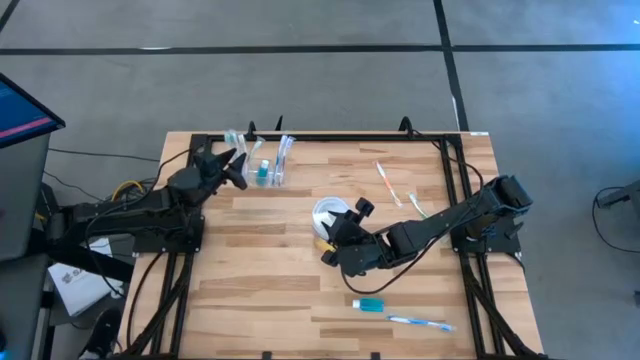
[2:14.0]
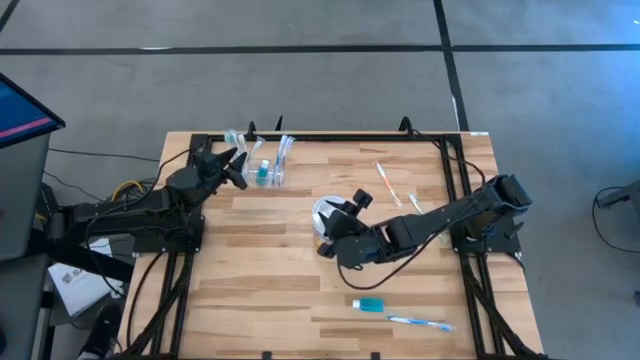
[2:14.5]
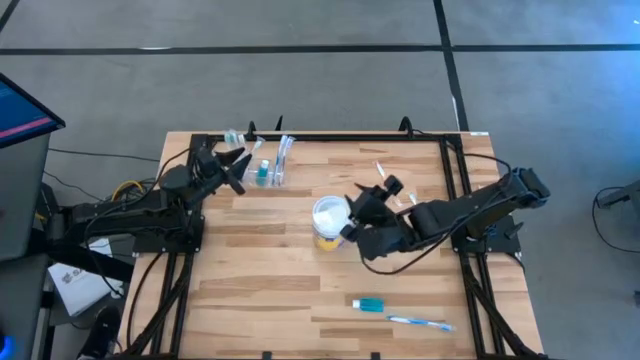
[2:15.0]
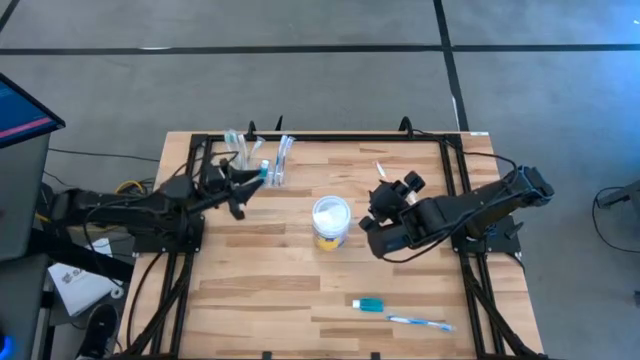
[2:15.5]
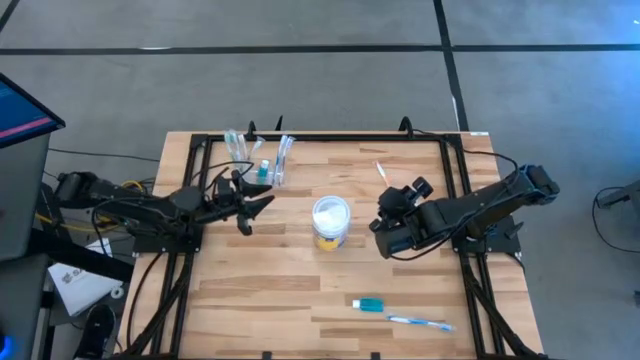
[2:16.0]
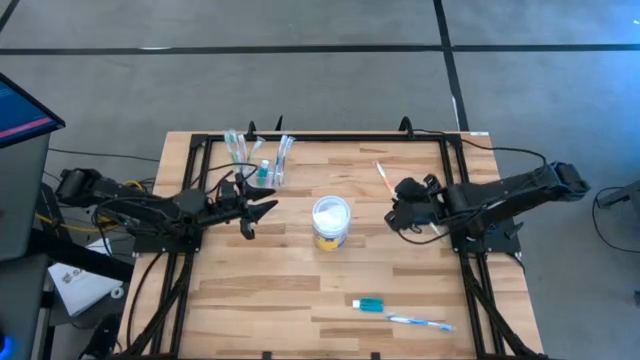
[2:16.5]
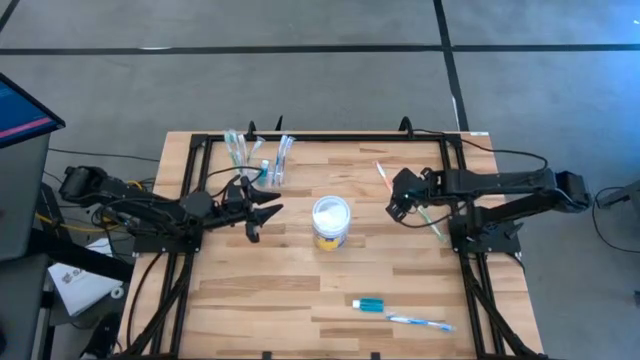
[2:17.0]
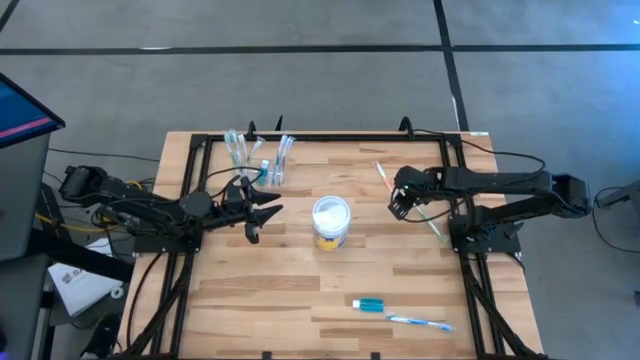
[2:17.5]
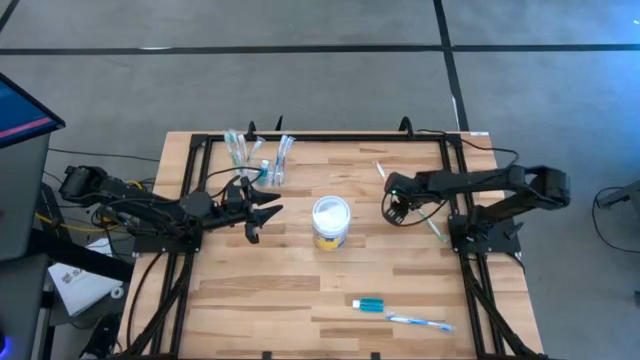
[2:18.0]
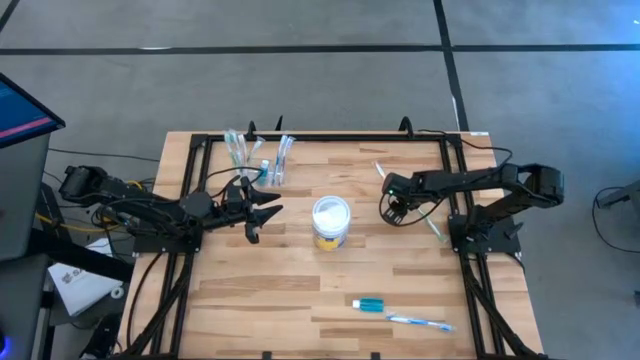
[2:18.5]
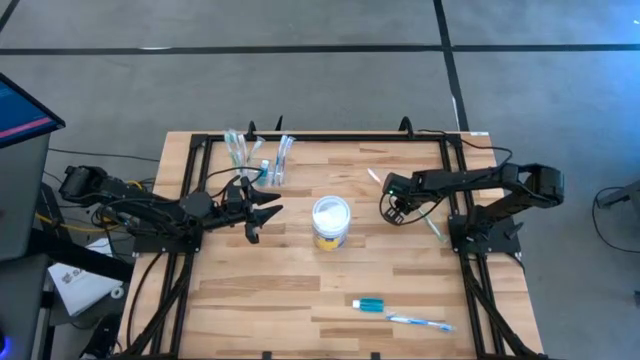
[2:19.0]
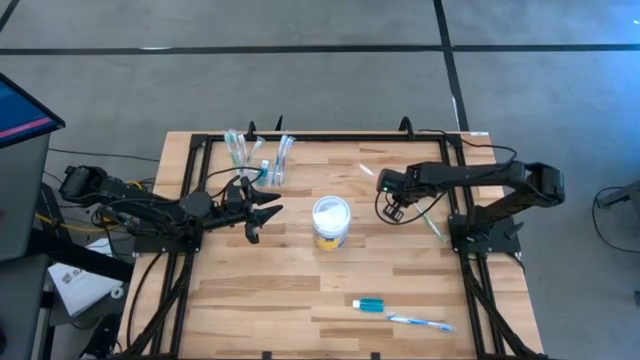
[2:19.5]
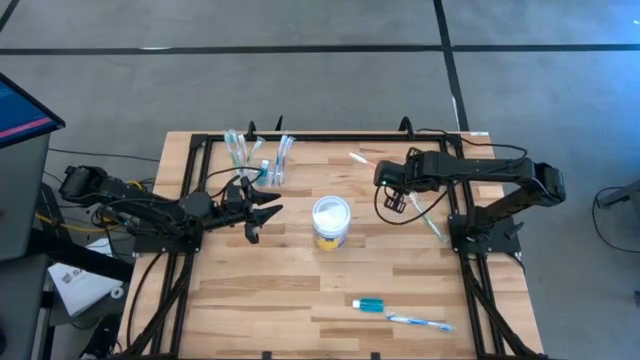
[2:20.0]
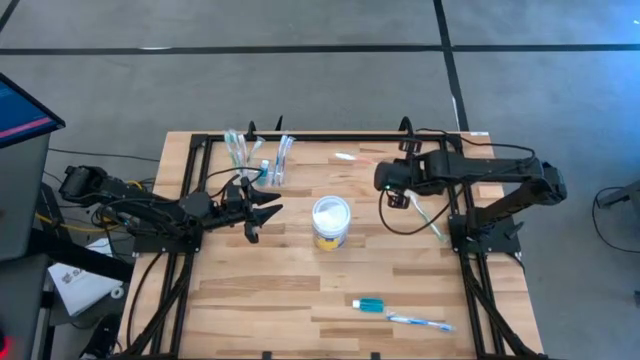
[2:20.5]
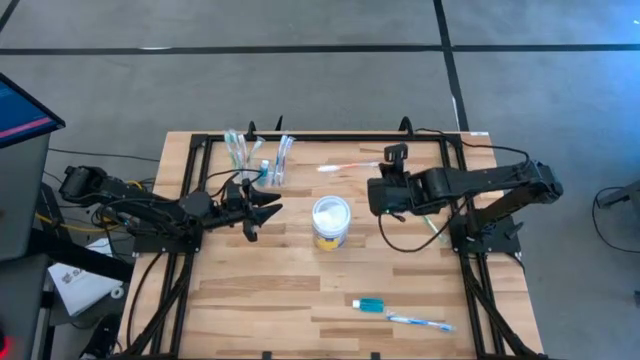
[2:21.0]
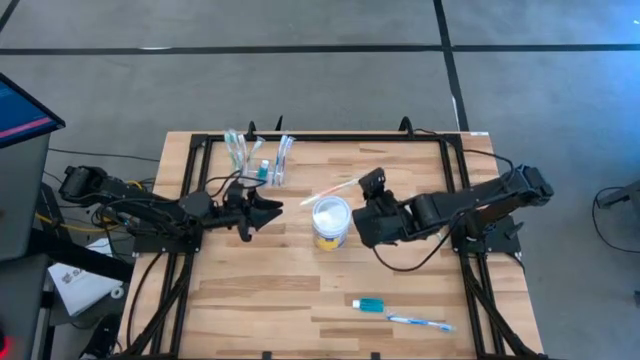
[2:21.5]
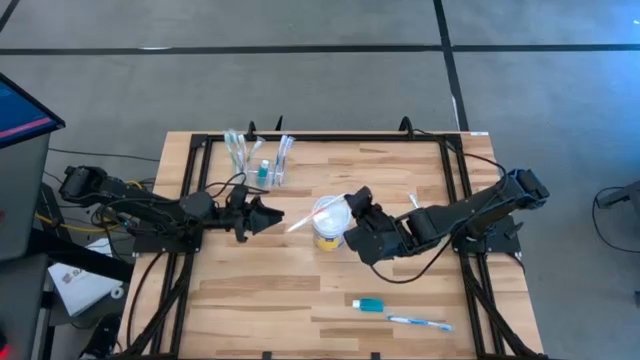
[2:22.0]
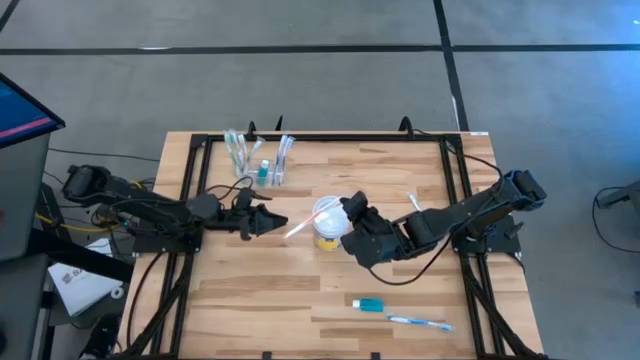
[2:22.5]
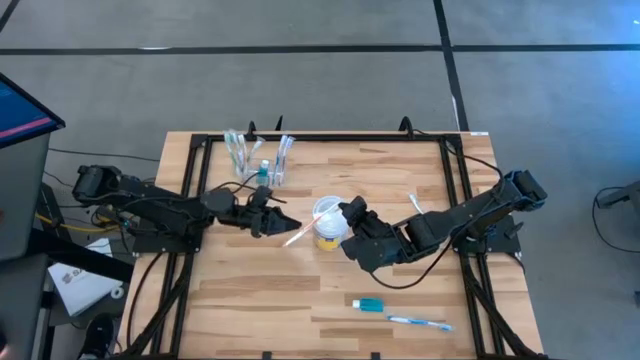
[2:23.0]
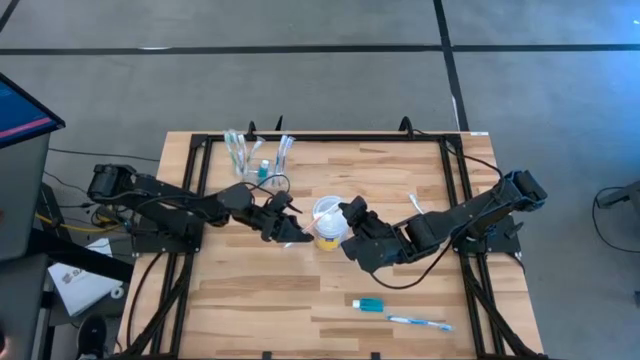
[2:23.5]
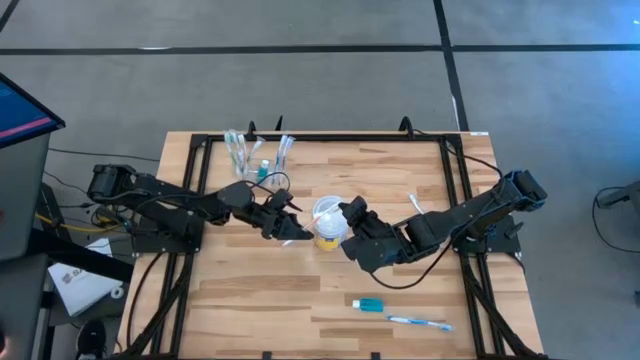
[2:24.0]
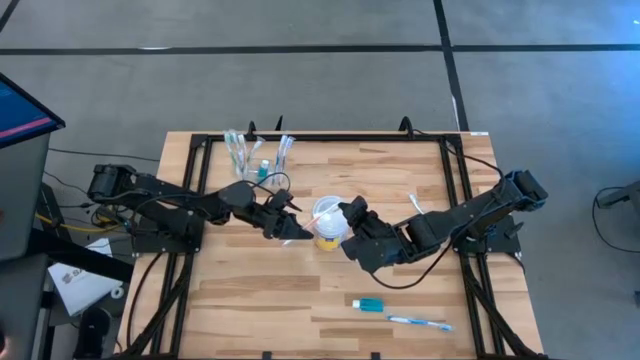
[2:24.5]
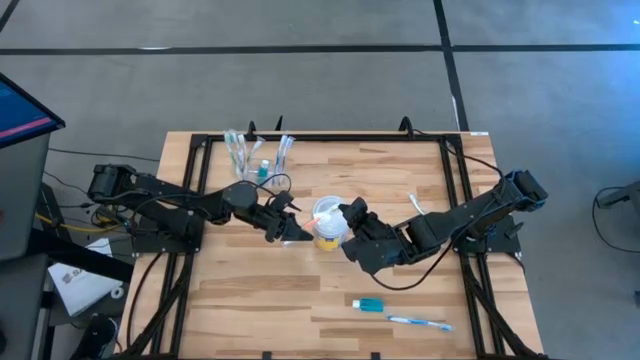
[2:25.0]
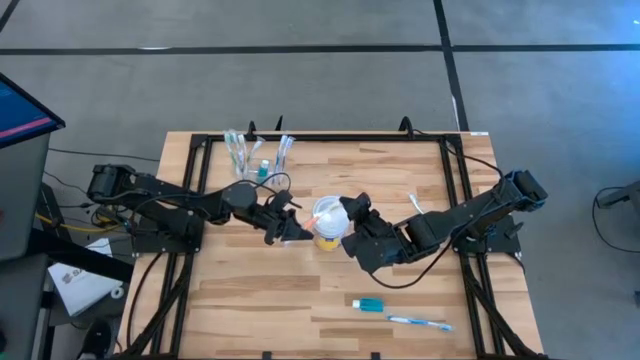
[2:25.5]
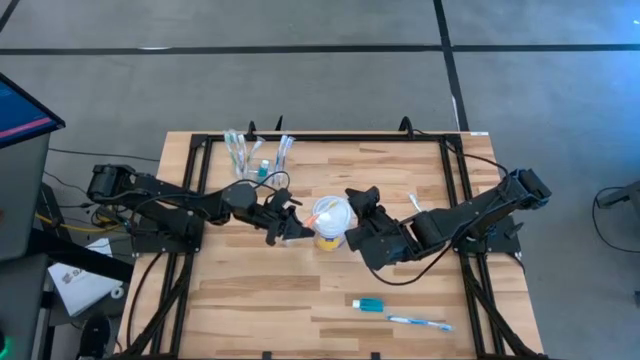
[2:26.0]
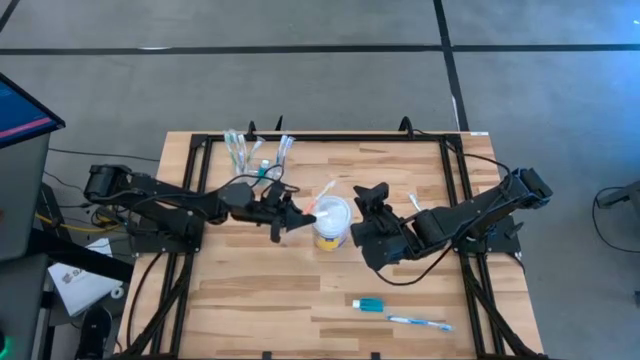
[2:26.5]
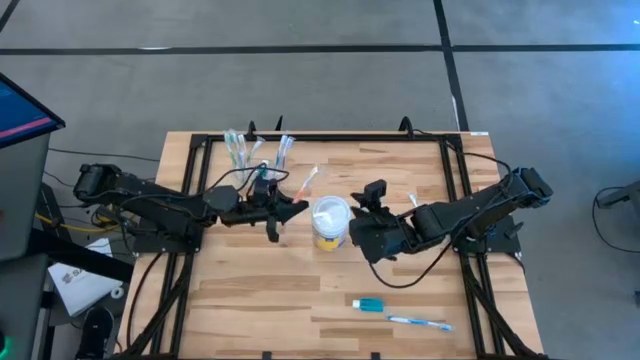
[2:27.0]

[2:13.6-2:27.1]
Task: Pick & Place toothbrushing station
Put the orange toothbrush into the transparent organizer

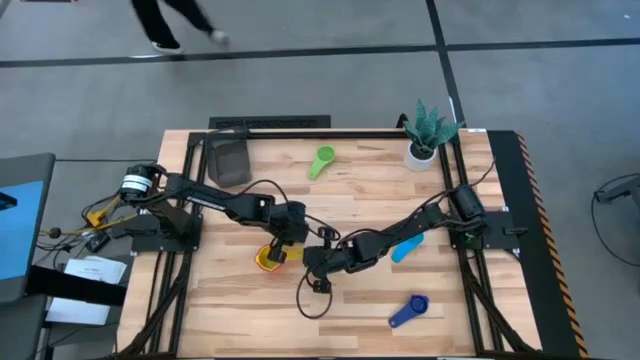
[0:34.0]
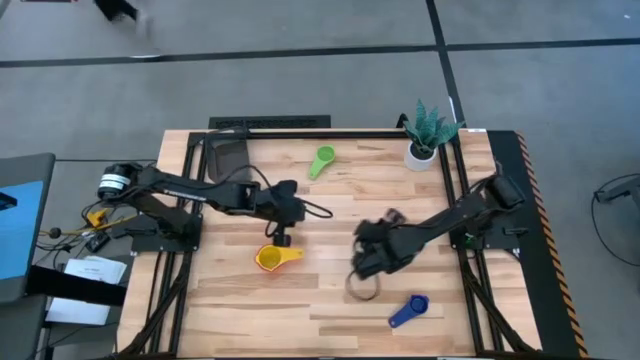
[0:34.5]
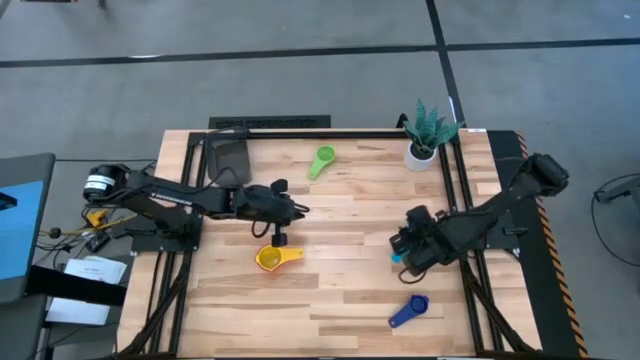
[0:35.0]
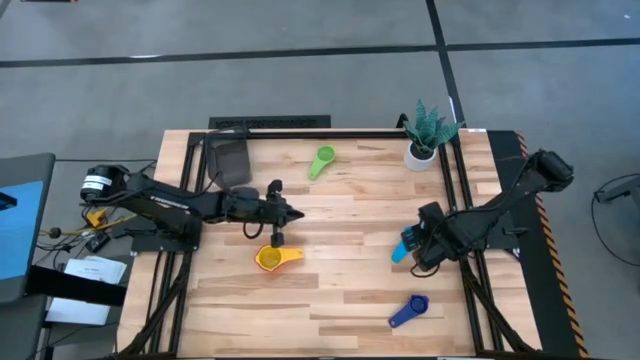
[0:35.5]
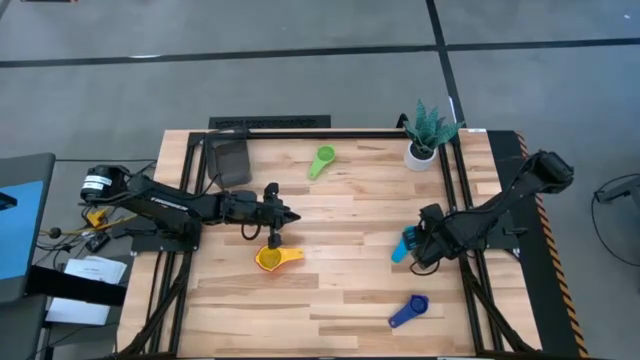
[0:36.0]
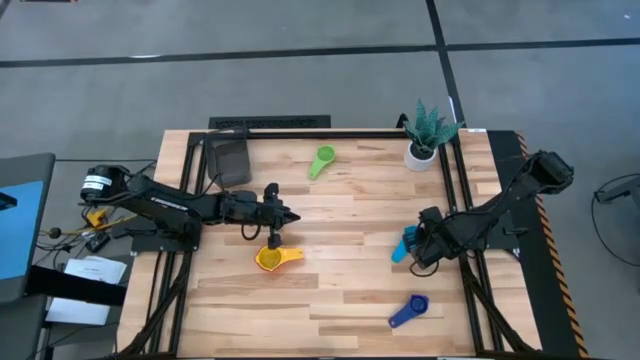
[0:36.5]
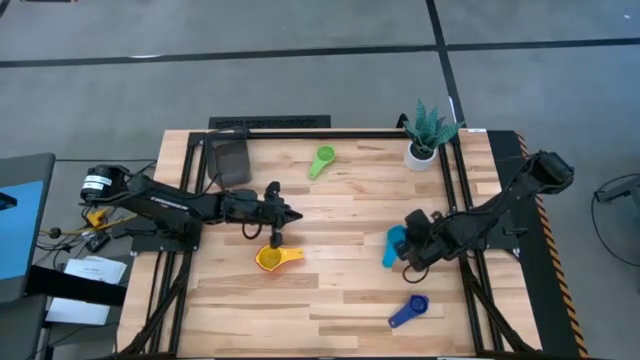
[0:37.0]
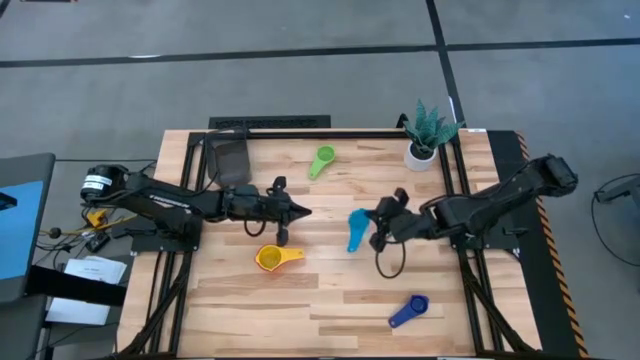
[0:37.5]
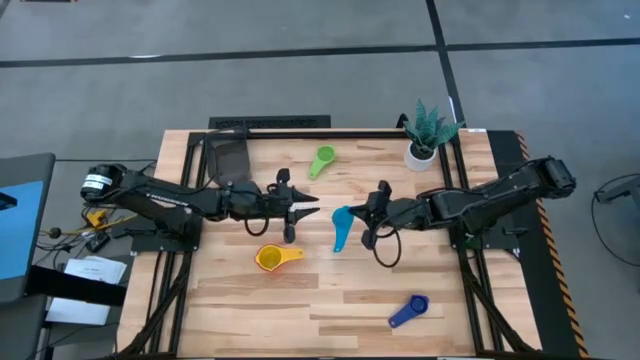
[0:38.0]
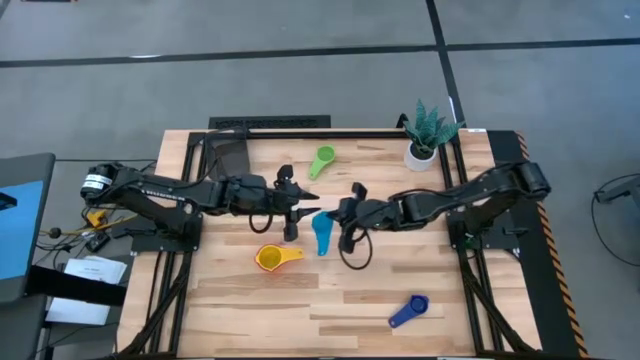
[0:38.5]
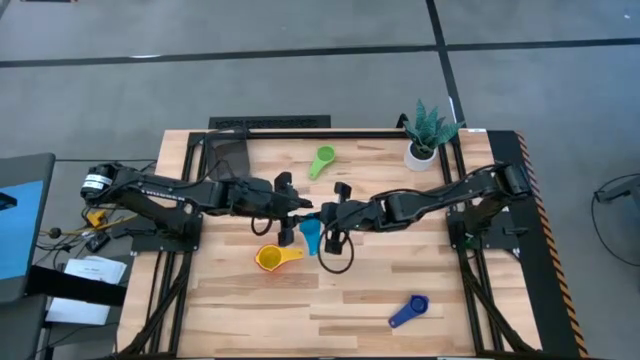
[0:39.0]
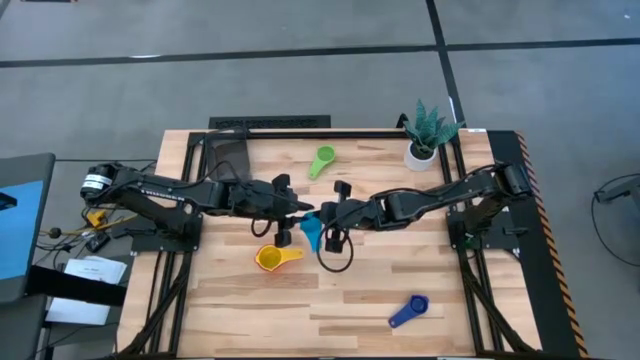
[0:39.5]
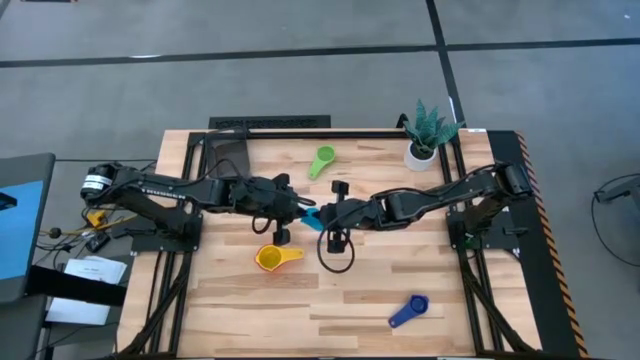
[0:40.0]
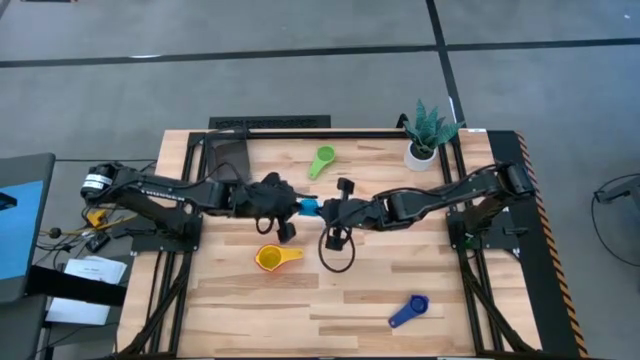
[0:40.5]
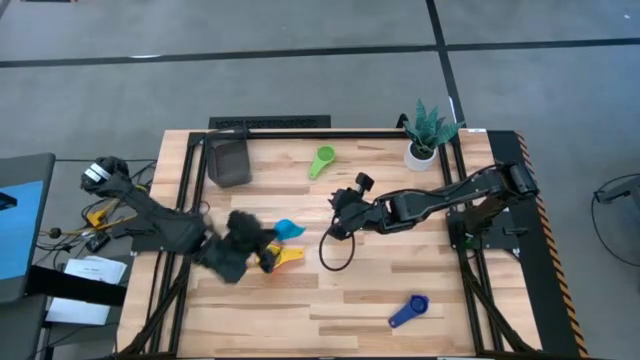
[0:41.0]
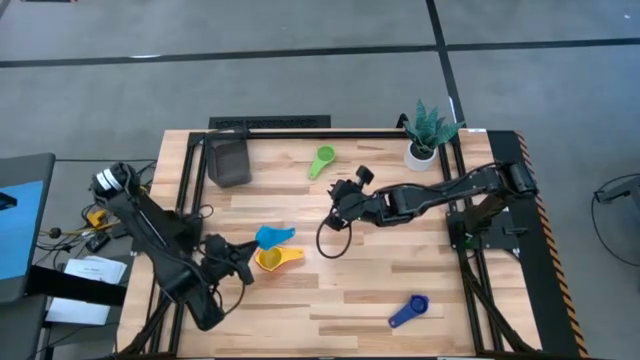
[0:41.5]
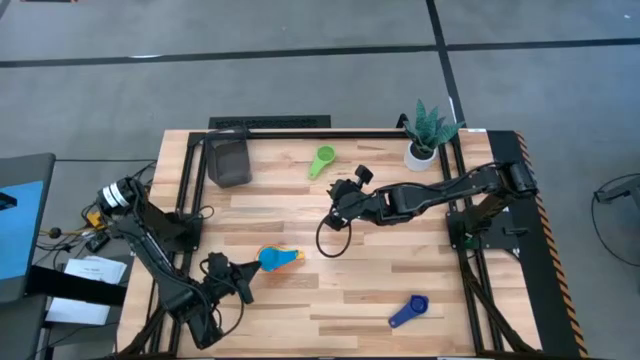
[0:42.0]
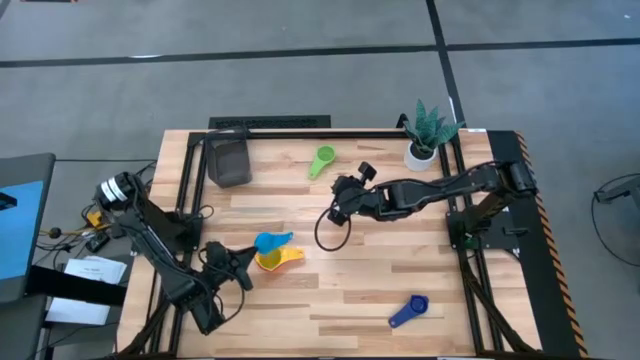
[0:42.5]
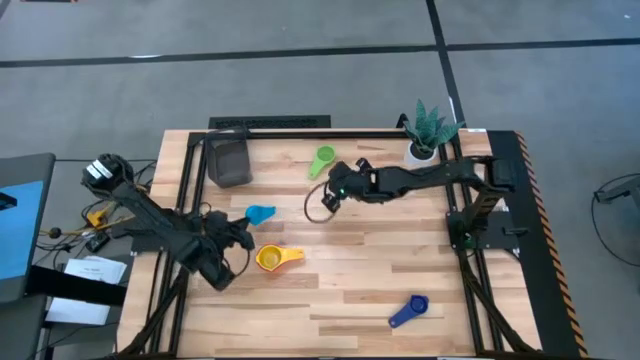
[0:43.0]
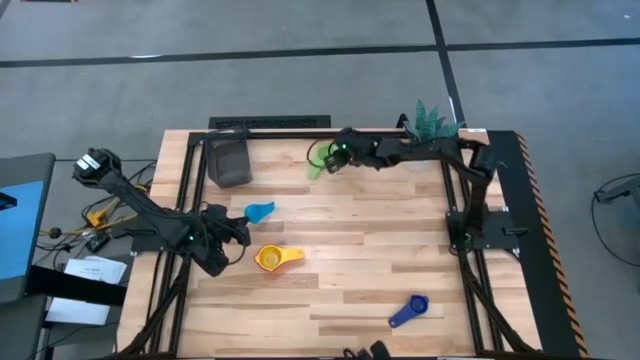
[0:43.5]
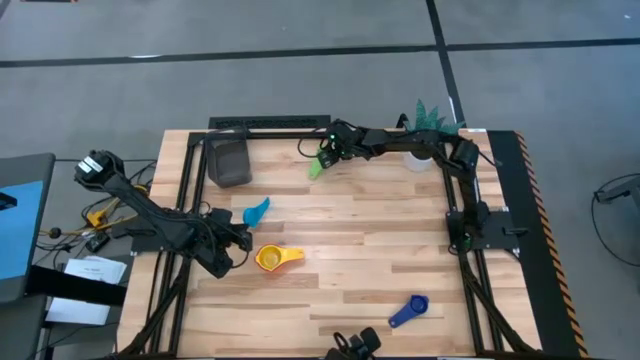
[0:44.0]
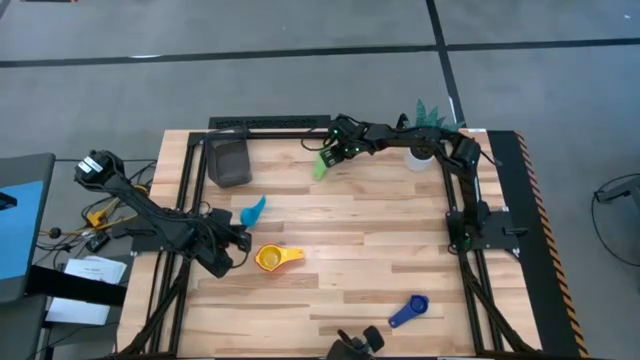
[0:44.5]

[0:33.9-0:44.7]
Task: Nest measuring cups in basket
Stack the light blue measuring cup on top of the green measuring cup
